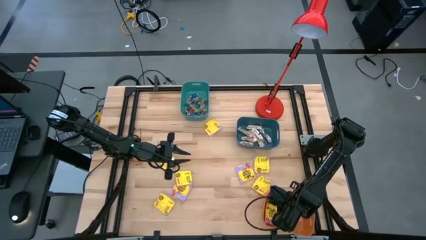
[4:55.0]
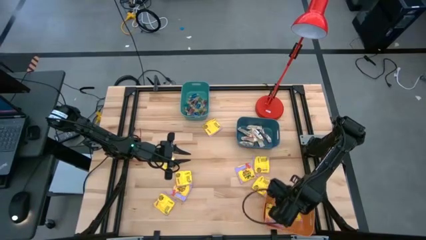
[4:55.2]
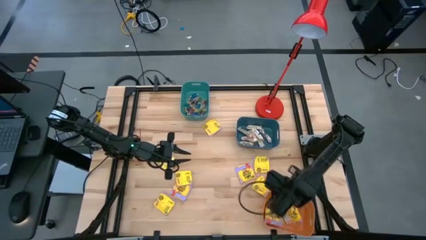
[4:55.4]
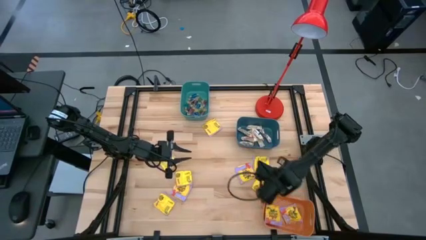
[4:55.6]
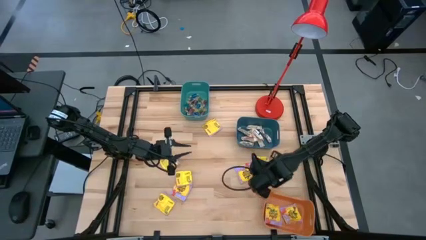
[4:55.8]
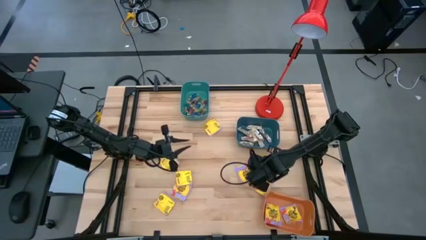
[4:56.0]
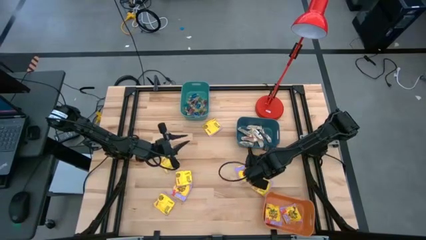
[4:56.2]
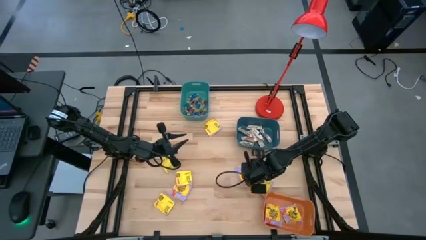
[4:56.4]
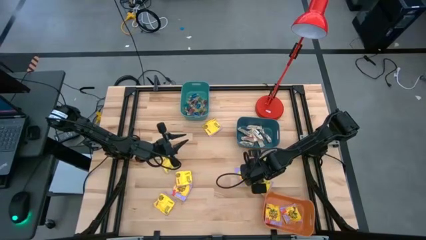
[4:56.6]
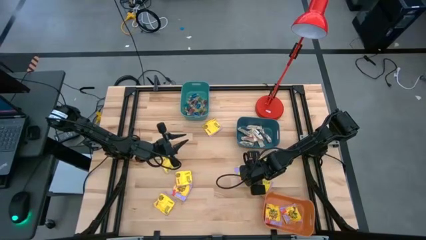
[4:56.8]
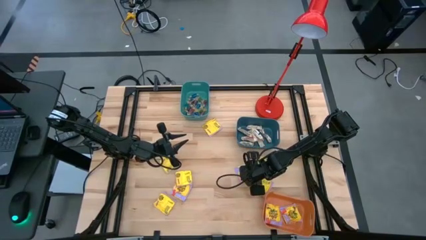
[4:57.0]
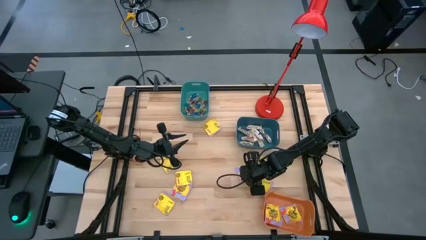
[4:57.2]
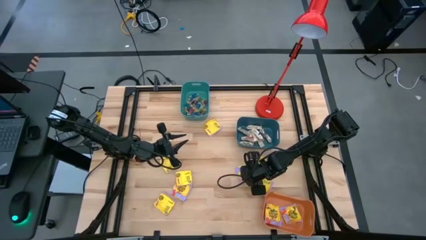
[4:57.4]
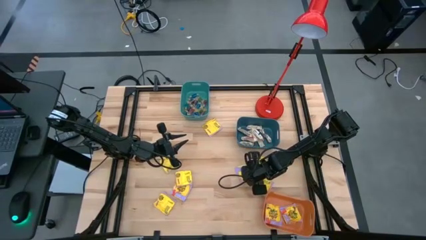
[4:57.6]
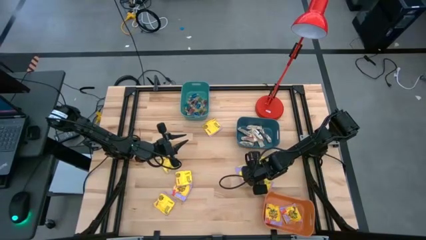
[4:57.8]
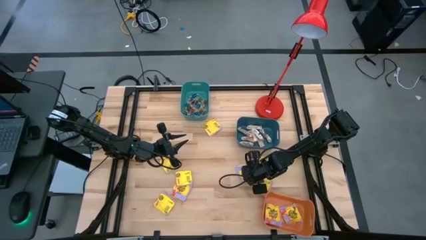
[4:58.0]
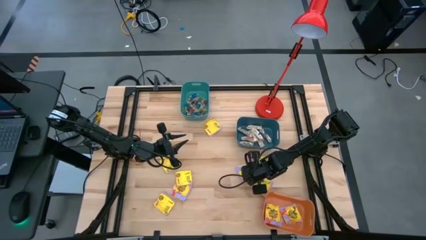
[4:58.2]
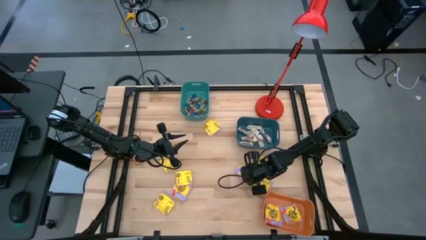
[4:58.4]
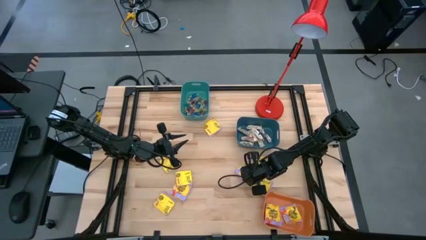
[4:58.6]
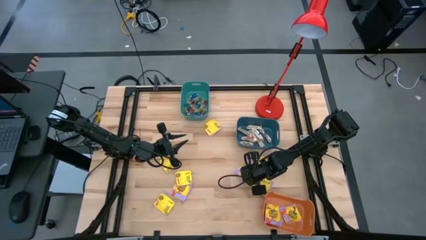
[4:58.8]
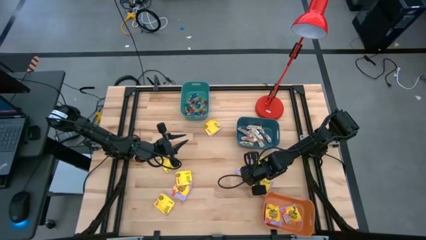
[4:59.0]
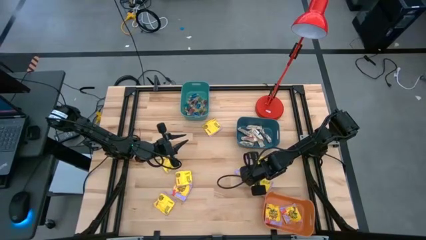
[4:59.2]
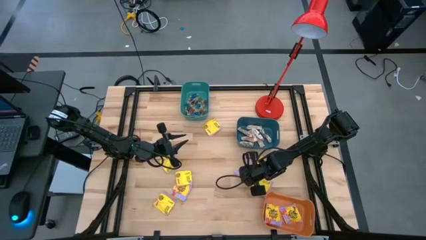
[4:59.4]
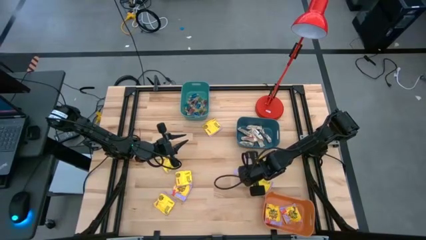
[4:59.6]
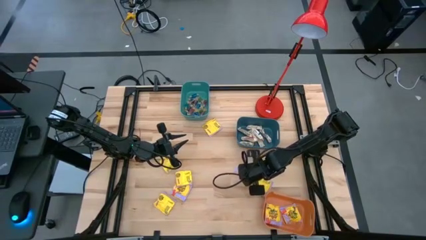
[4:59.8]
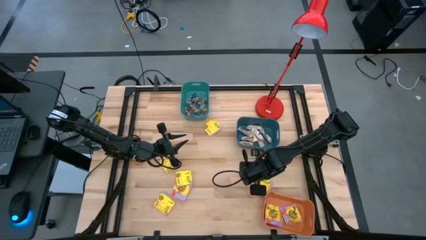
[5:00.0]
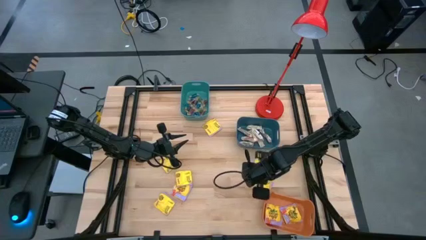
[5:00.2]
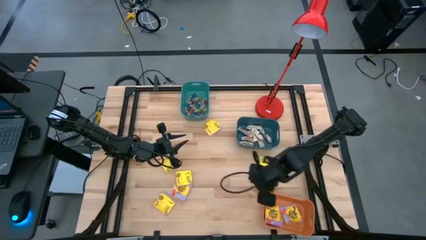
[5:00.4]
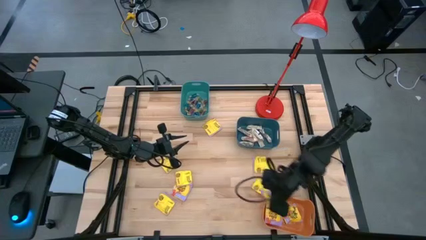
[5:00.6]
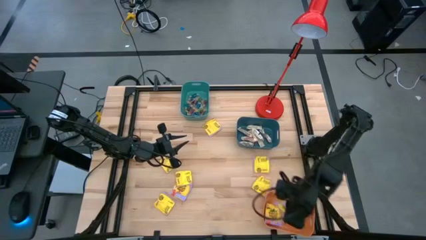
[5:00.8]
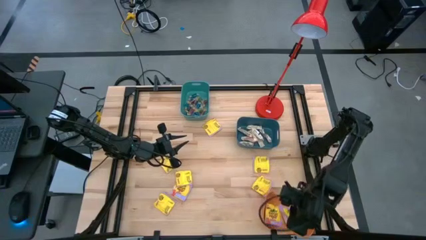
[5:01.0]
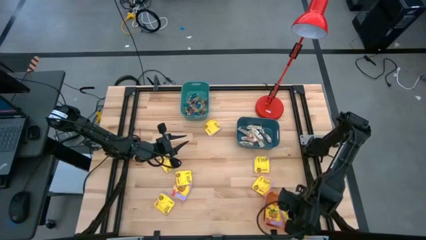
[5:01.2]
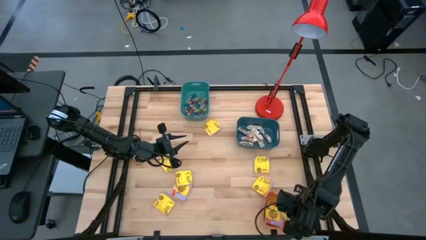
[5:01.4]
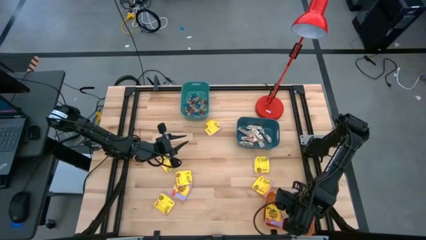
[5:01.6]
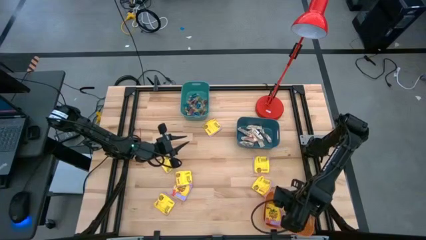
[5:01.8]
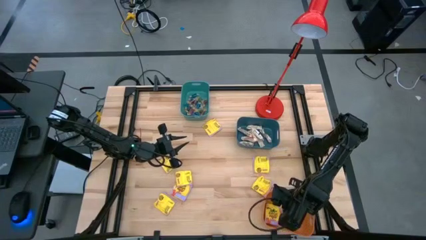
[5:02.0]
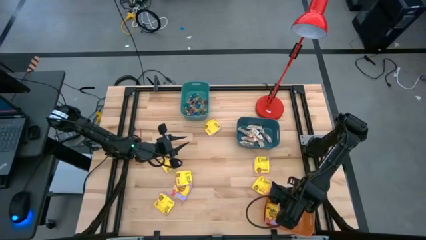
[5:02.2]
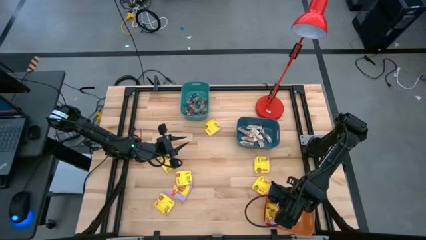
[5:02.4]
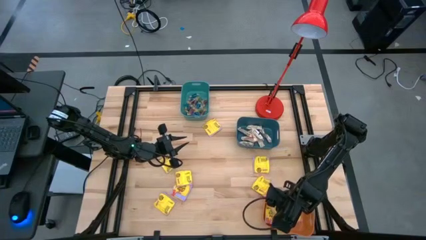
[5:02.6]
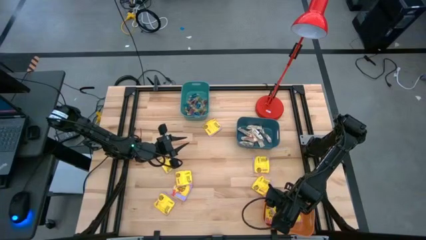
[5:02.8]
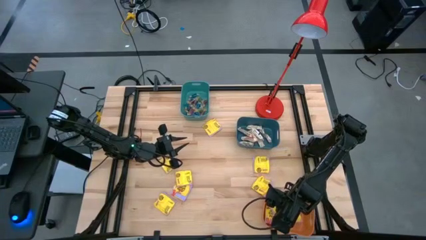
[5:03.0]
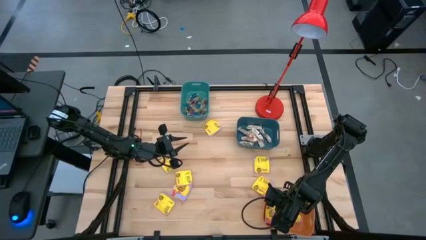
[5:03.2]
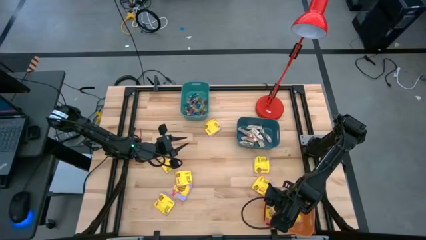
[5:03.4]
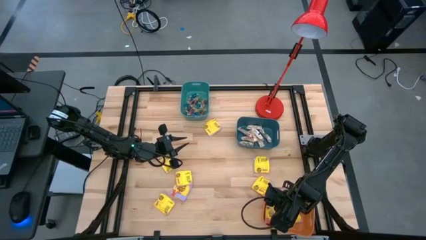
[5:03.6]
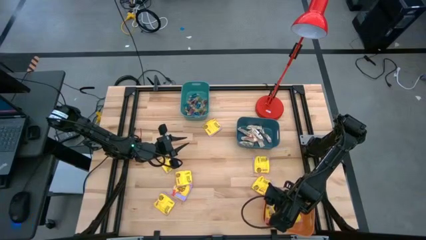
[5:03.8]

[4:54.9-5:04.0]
Task: Sort candy
Put the yellow candy bag into the orange bin

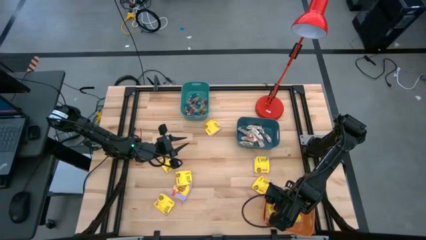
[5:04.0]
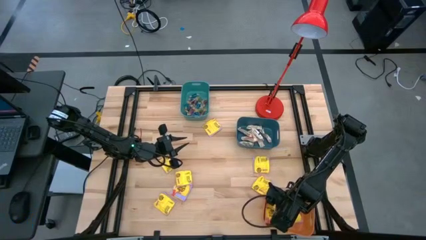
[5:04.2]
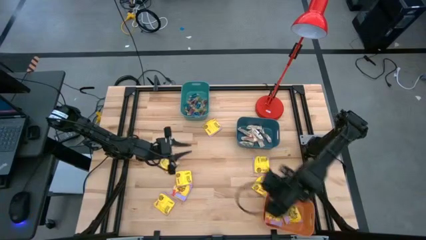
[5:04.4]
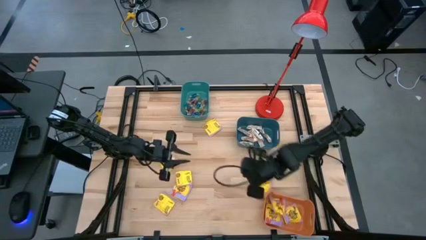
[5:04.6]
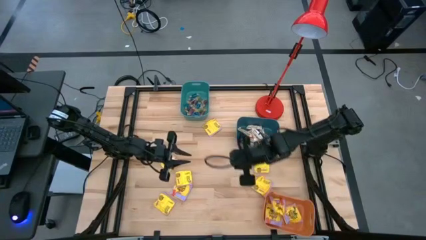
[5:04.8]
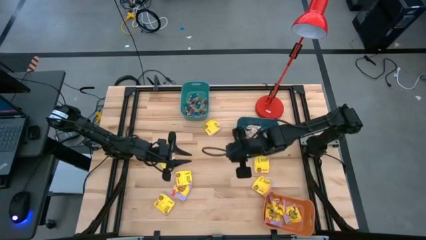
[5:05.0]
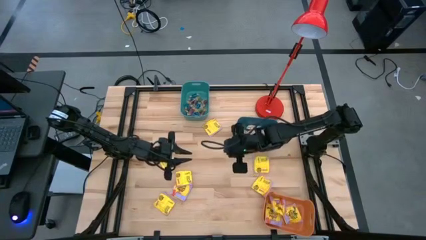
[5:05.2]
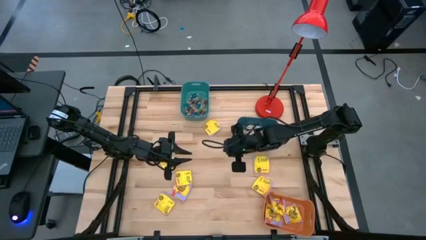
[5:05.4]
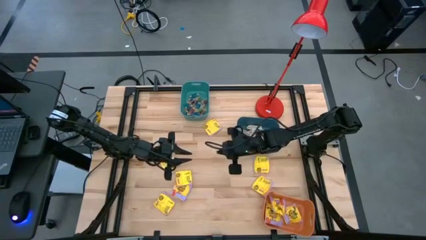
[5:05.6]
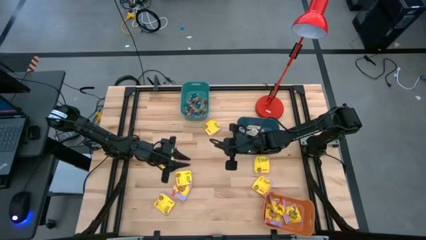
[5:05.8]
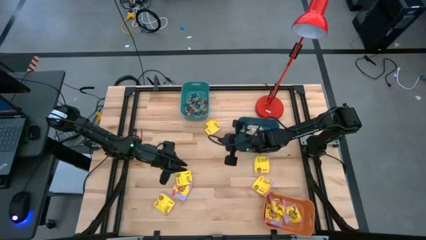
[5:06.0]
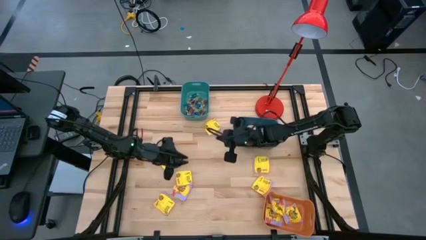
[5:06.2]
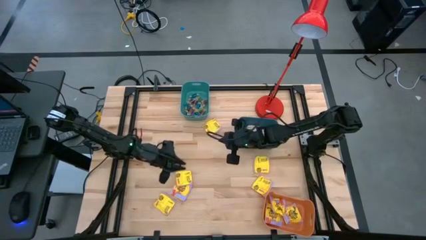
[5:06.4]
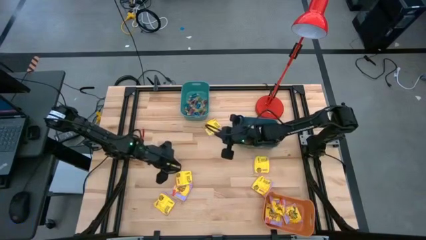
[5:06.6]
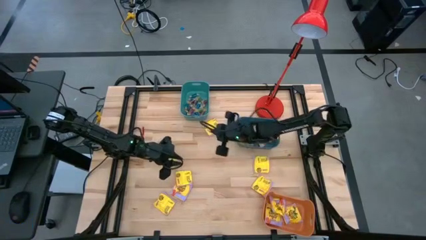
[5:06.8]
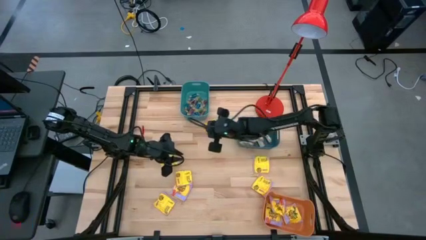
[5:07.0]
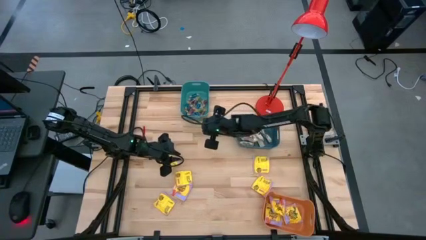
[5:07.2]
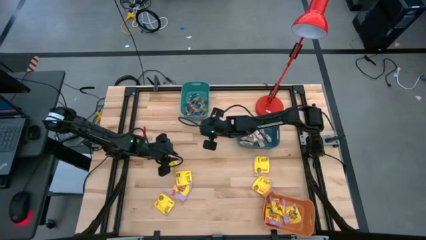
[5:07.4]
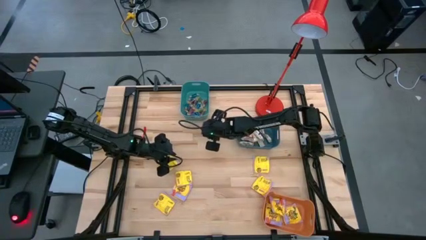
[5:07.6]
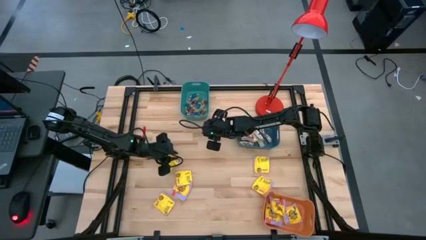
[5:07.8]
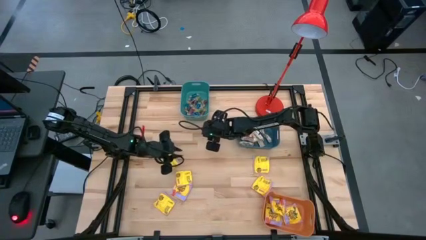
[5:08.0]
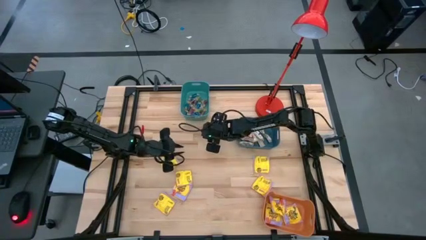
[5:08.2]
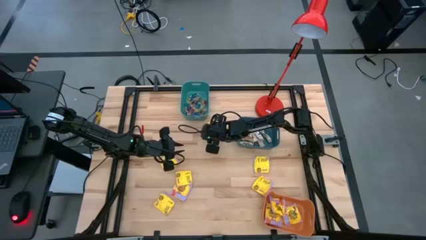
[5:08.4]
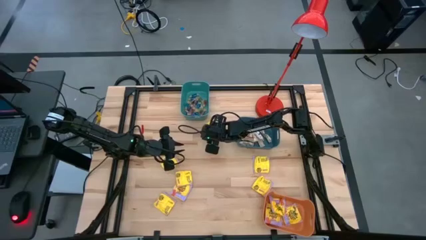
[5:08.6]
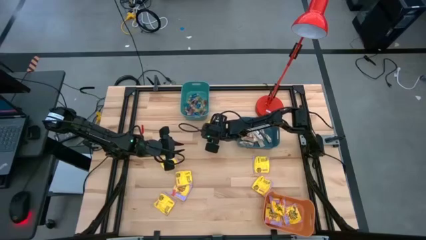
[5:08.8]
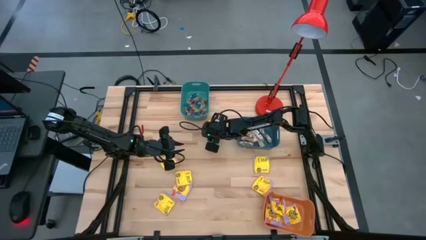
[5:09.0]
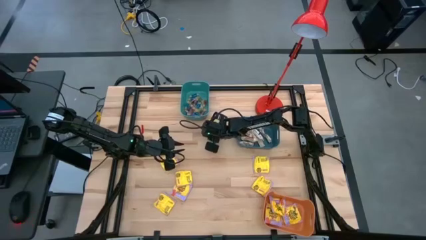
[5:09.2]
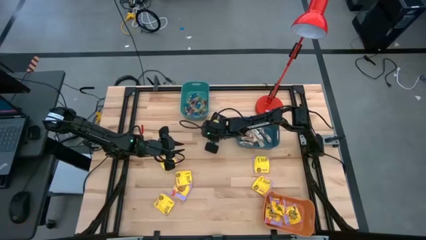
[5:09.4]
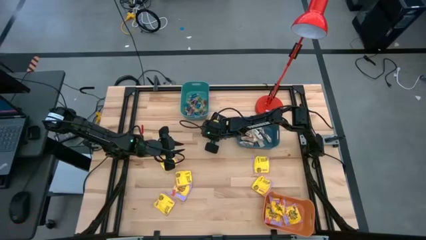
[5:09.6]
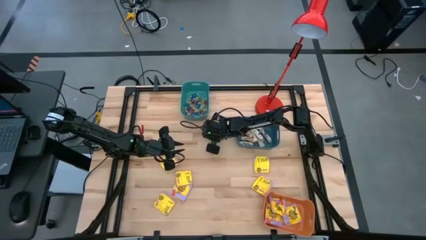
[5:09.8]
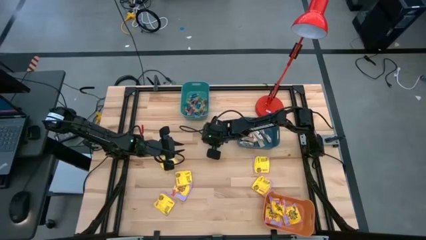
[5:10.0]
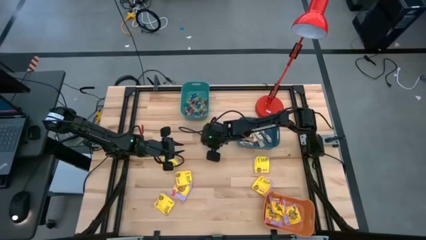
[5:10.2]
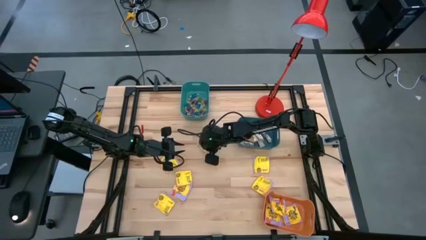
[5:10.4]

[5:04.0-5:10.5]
Put the yellow candy bag into the orange bin

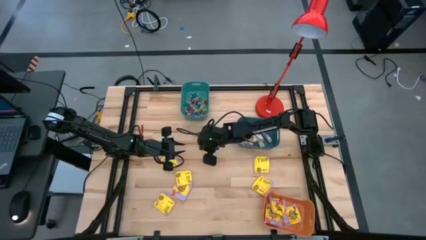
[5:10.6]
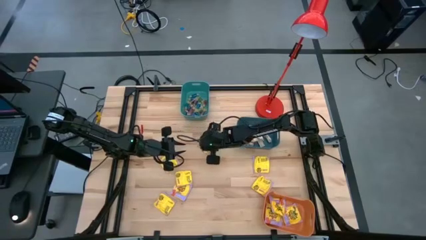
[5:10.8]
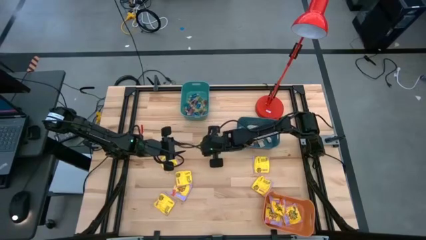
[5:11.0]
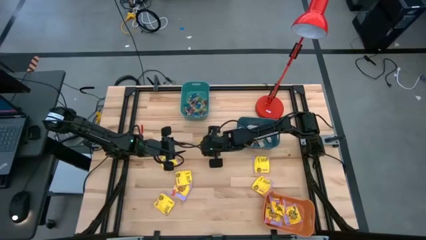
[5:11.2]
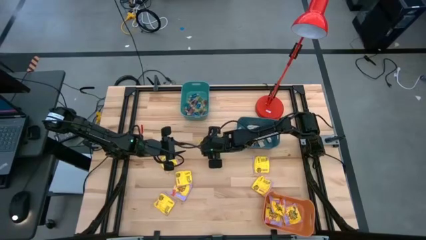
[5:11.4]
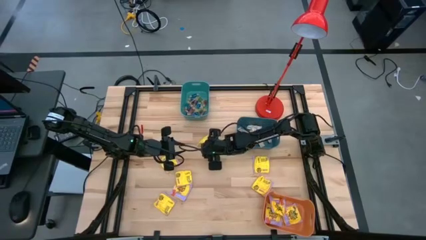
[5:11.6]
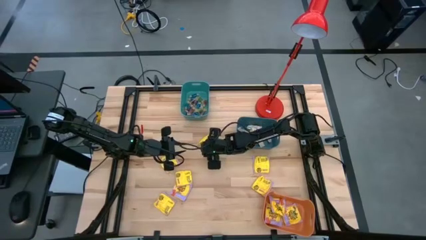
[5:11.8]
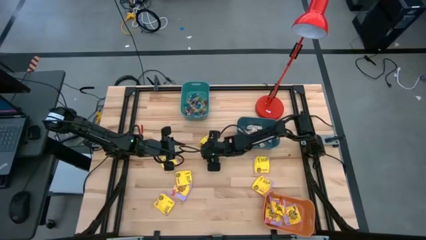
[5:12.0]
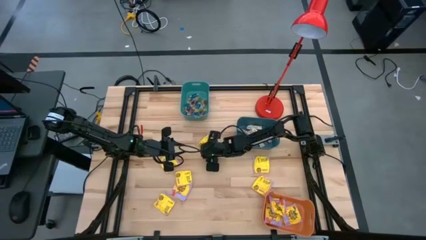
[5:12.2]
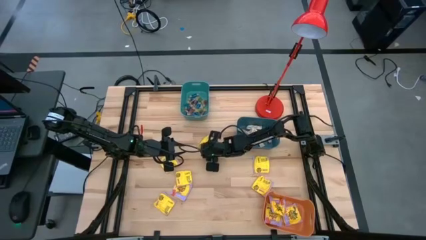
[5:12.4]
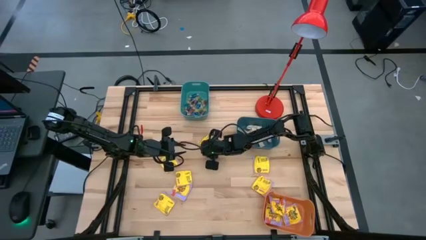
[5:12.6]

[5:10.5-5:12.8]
Put the yellow candy bag into the orange bin
